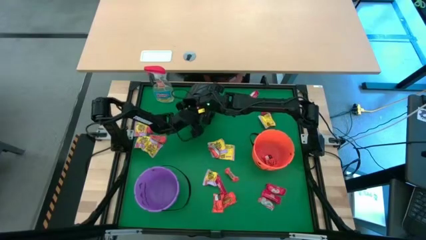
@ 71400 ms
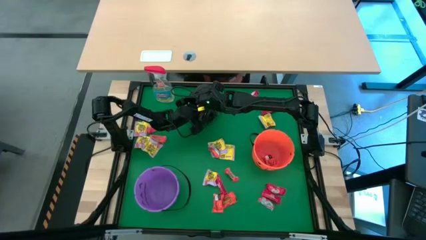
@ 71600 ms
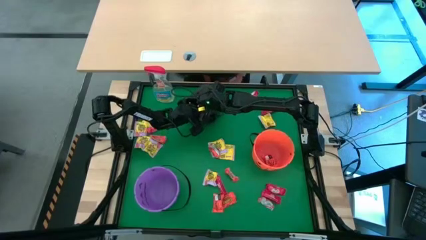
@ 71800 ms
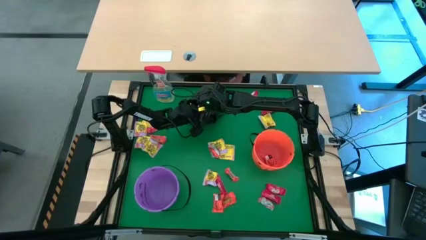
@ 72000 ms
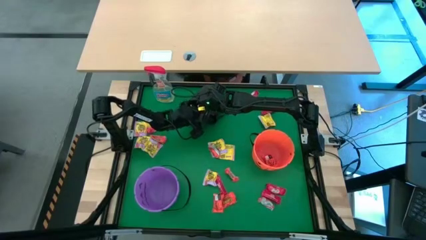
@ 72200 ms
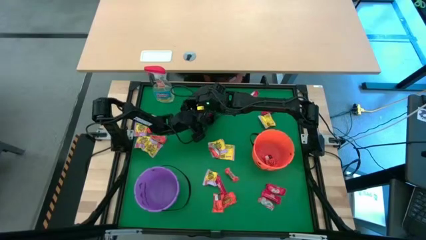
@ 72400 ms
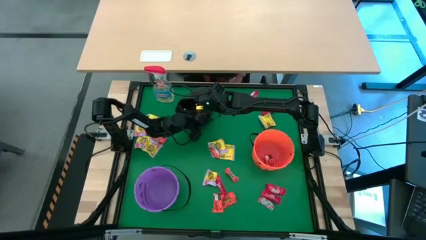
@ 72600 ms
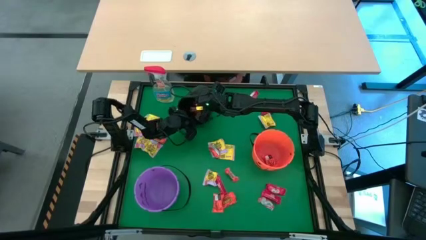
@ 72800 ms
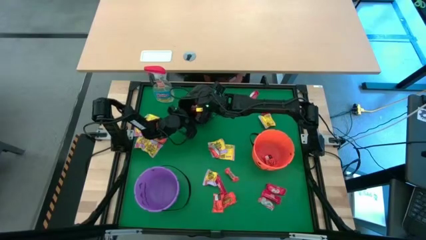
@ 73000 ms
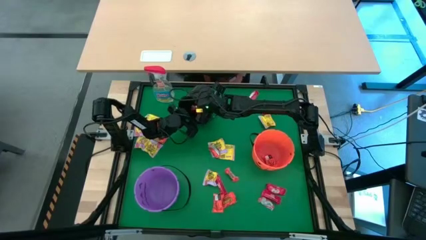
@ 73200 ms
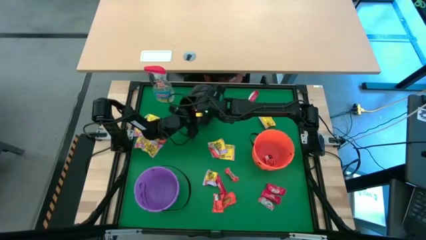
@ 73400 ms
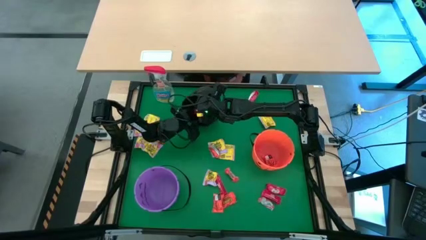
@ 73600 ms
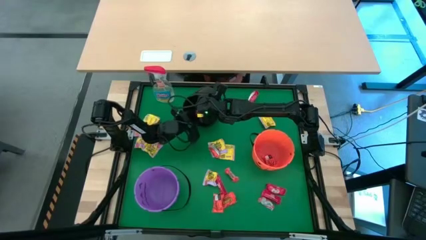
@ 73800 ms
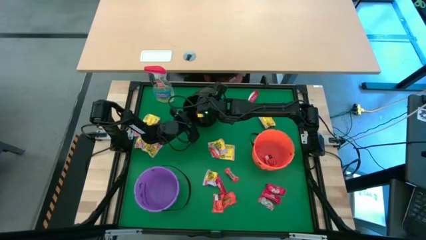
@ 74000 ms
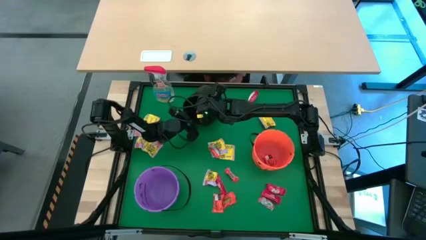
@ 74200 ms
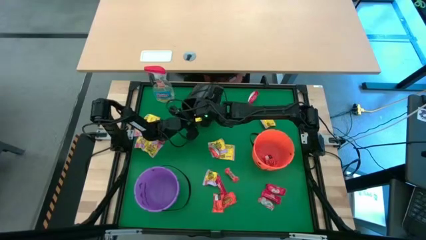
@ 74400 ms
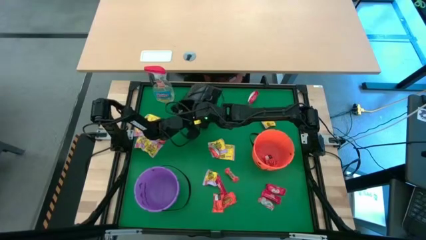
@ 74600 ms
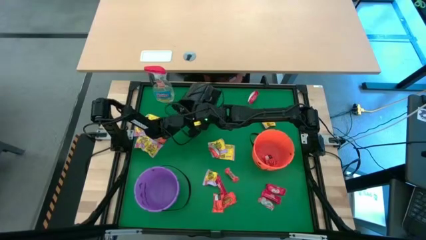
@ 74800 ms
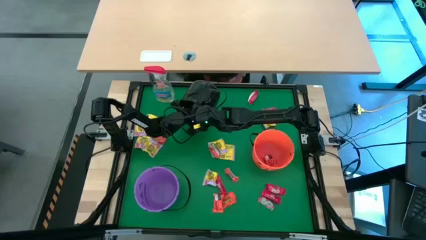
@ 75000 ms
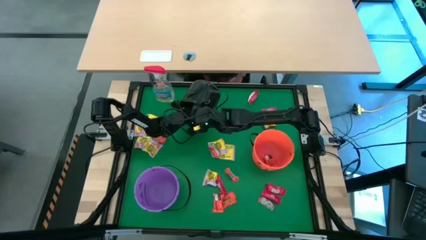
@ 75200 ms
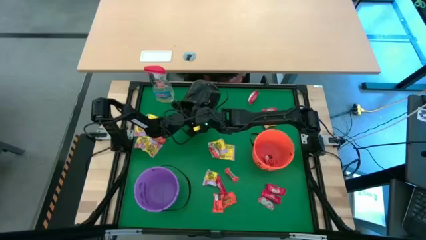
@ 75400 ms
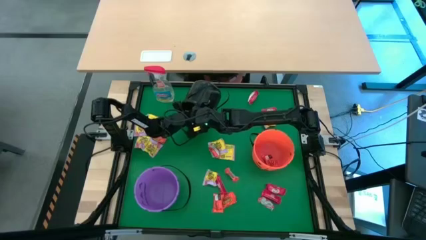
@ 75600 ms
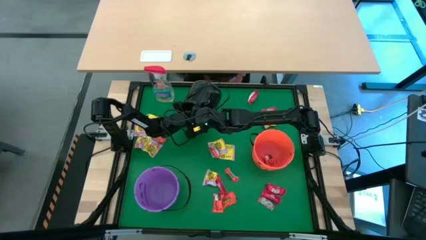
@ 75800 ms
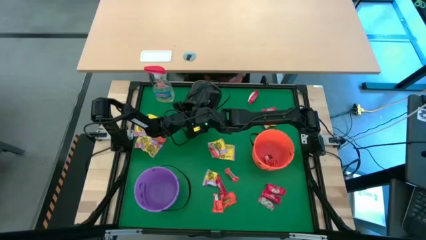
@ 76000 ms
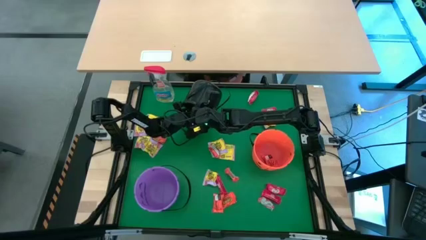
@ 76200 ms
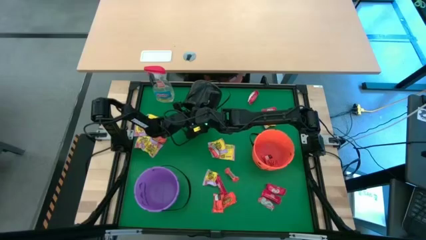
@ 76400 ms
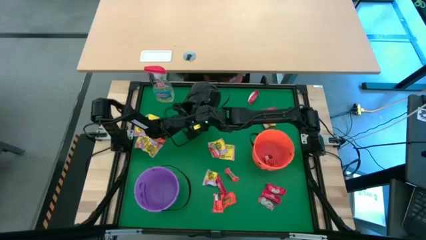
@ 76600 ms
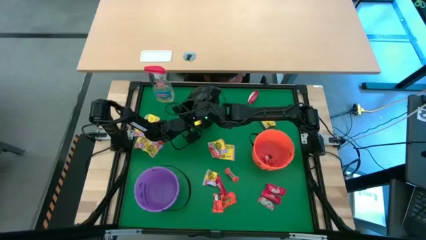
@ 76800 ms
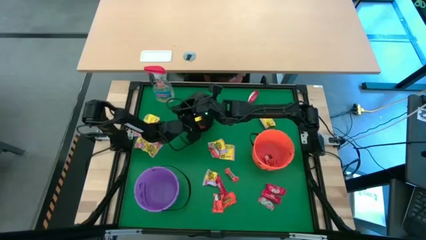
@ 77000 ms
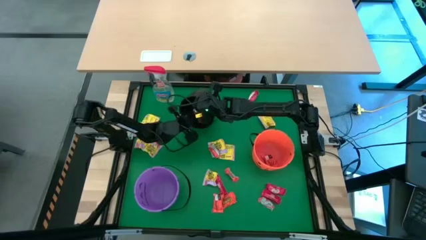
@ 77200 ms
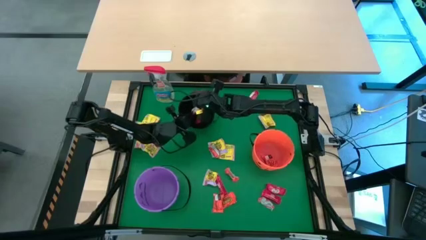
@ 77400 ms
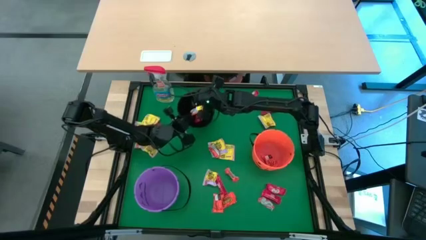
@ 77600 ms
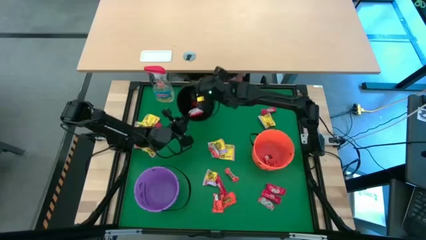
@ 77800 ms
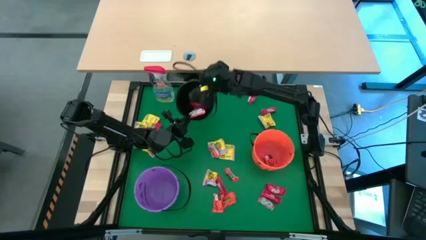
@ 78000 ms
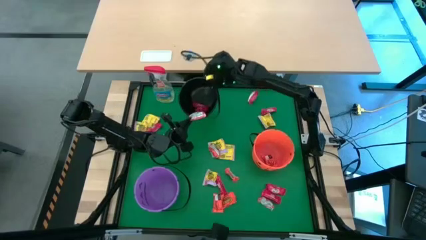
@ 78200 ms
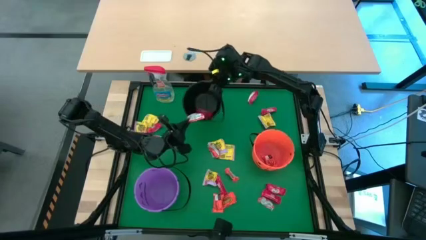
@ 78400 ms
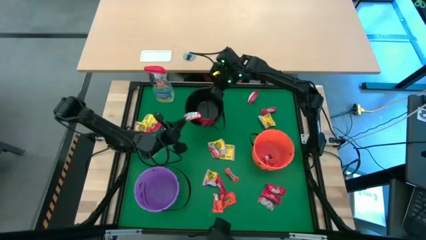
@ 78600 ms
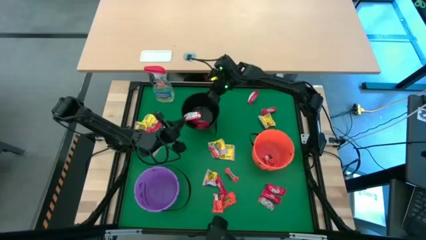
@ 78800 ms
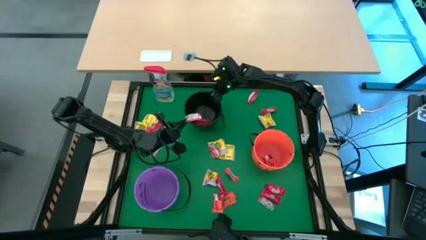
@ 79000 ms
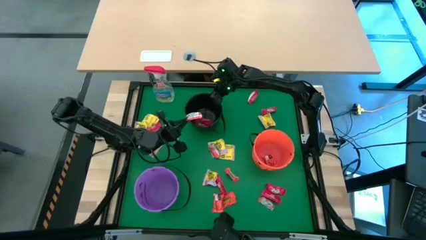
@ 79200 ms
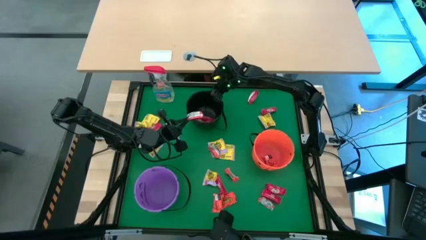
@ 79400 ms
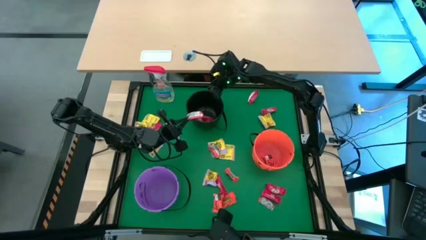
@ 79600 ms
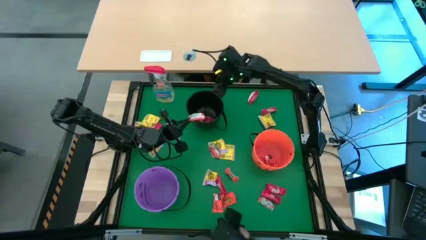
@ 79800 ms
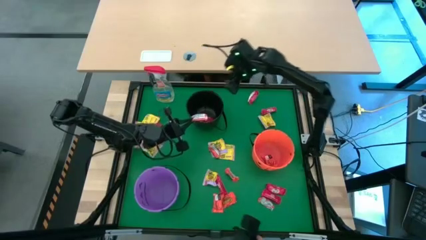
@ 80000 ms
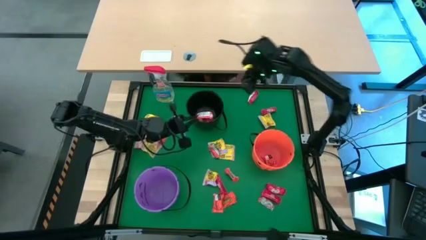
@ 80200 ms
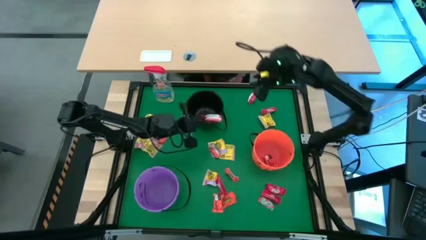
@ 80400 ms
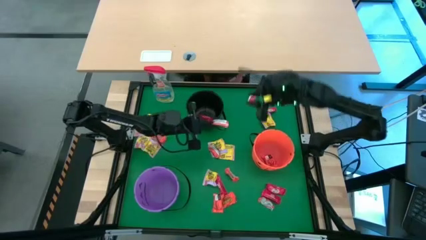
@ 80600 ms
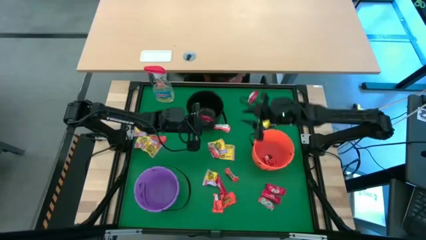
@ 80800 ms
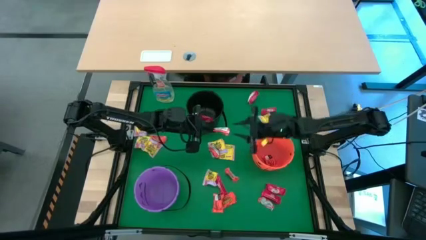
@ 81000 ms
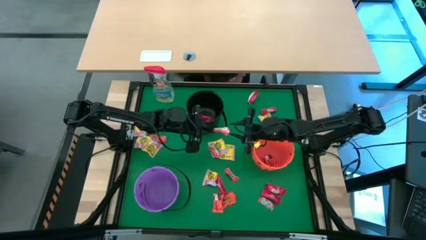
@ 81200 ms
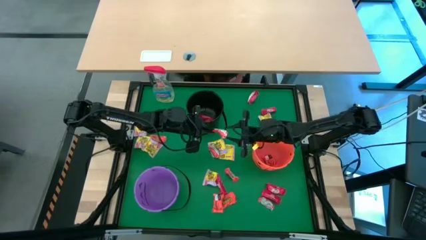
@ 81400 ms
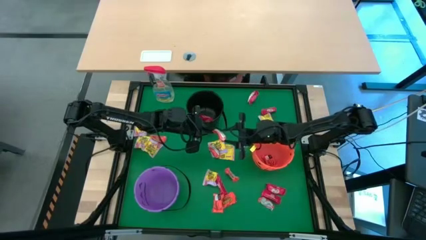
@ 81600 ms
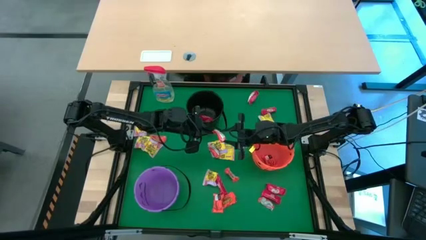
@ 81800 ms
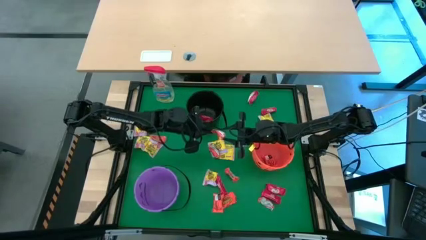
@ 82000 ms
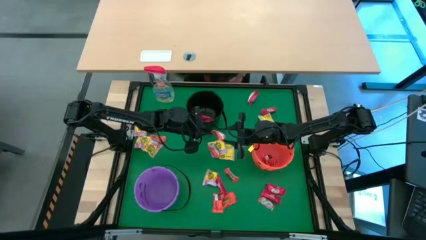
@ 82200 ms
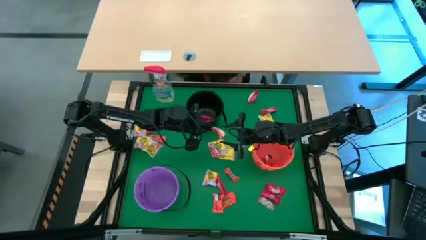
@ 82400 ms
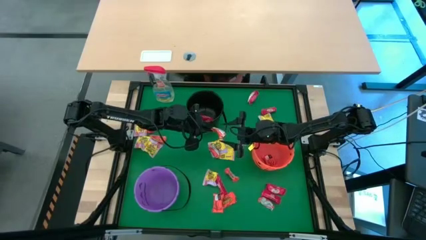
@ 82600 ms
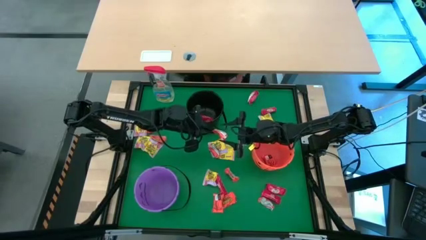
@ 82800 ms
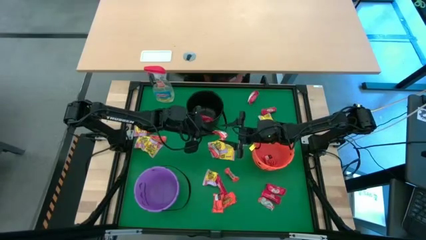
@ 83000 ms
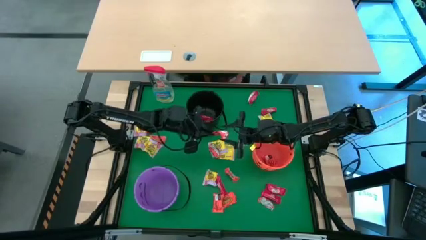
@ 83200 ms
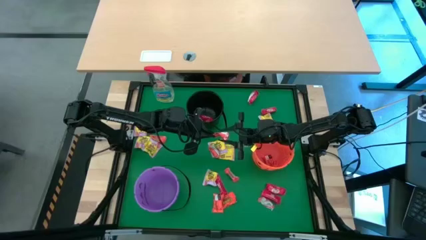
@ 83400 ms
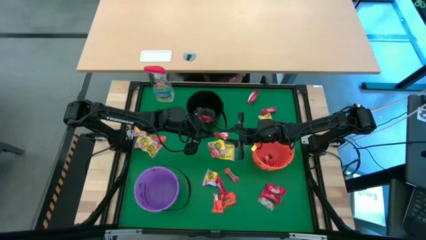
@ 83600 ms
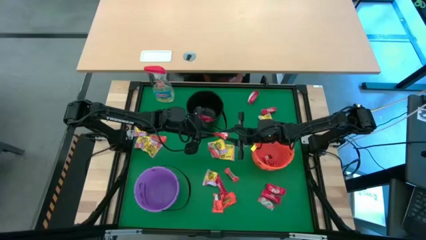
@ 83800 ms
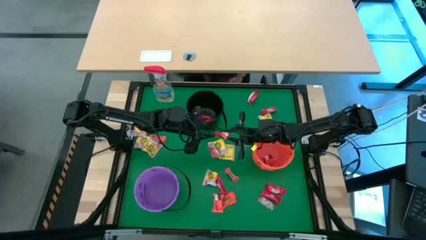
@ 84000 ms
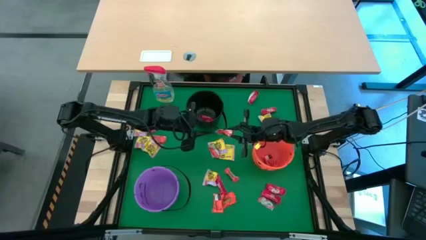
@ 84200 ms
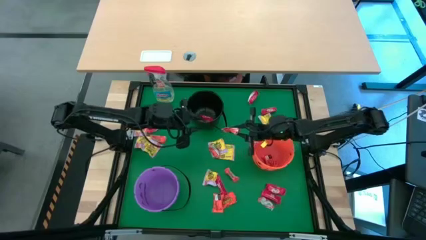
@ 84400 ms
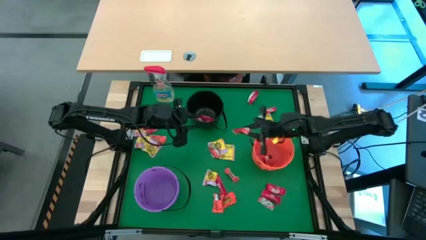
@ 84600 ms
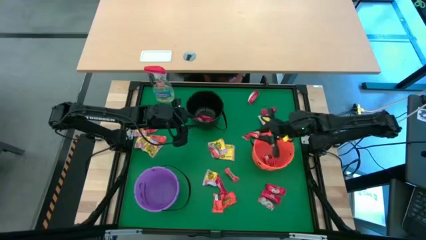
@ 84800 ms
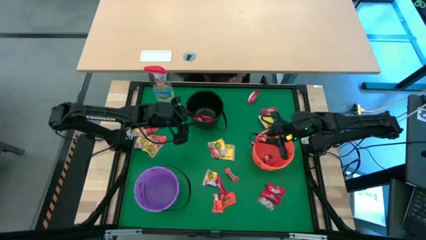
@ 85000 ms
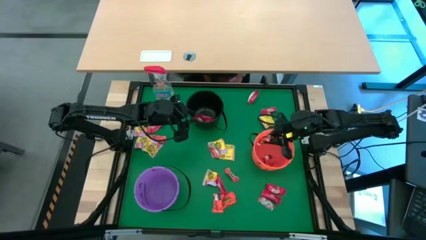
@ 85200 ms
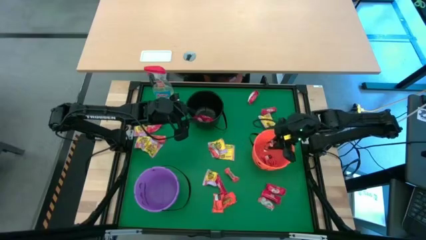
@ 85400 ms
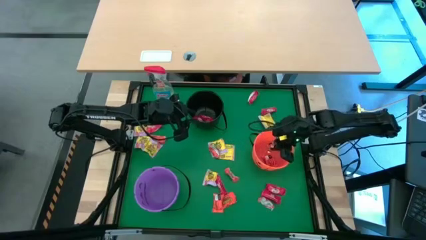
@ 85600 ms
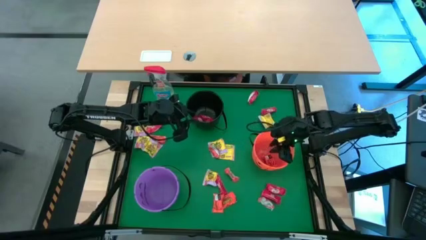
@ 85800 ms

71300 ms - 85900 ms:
Task: Sort candy
Remove the orange candy from the black bucket

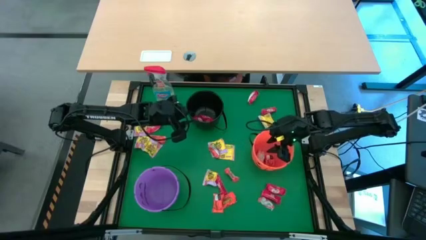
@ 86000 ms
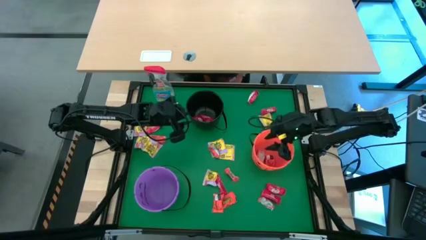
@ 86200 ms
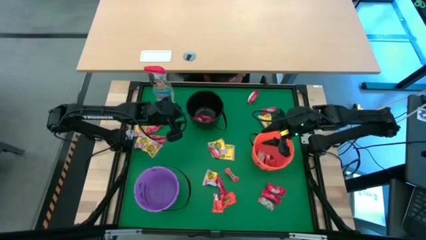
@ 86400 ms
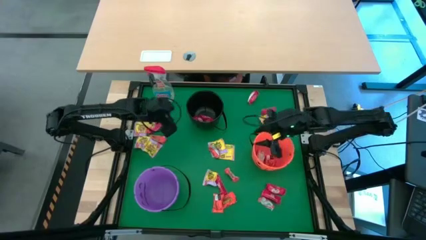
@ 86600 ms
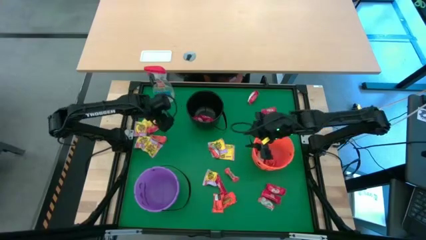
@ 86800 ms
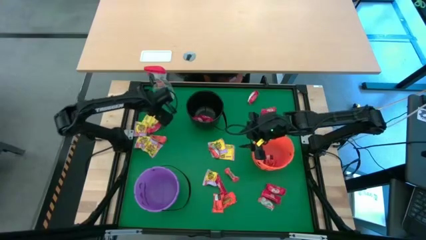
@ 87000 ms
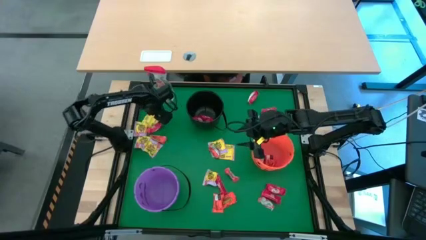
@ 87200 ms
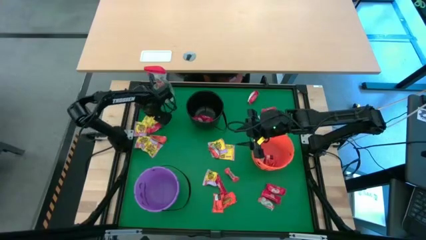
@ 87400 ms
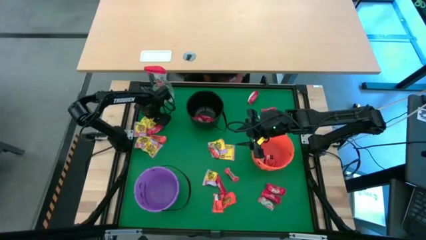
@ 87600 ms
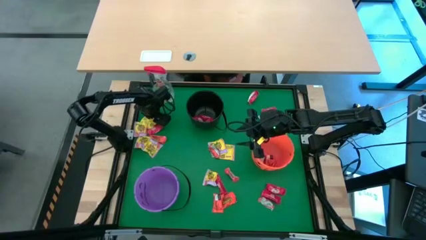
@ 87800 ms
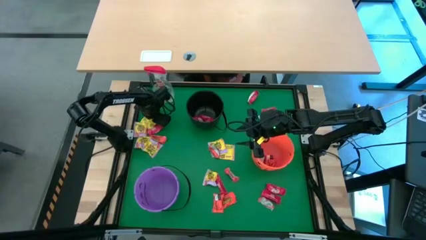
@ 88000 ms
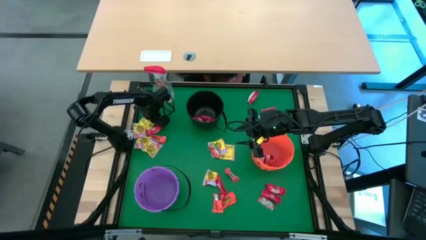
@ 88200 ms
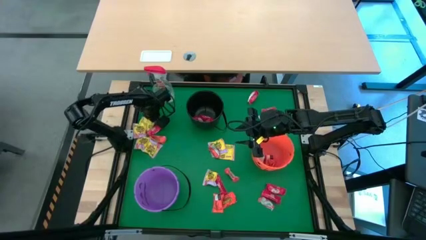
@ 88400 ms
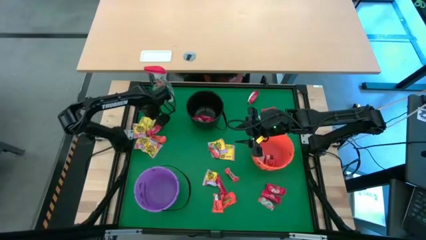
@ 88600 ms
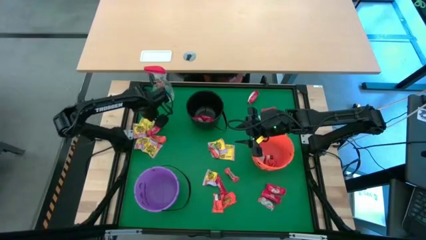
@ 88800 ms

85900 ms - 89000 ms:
Put the yellow candy into the violet bucket
